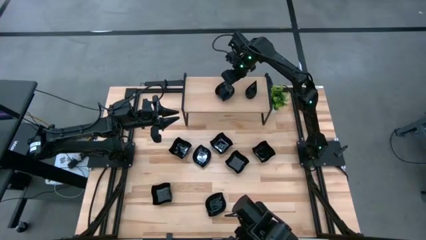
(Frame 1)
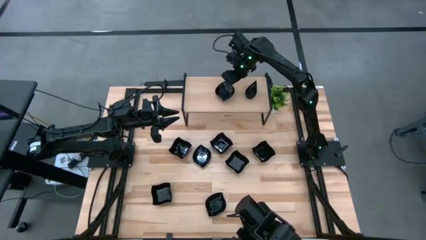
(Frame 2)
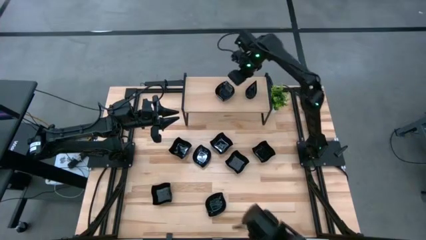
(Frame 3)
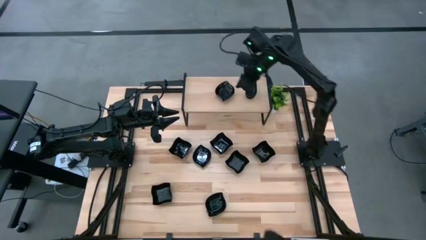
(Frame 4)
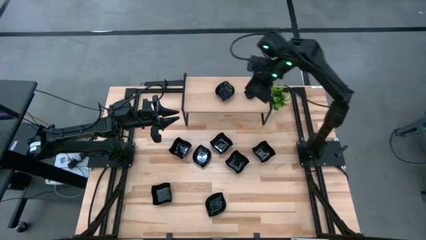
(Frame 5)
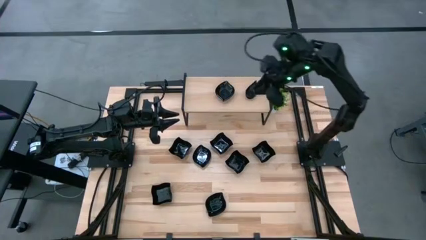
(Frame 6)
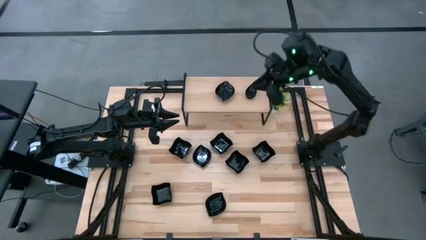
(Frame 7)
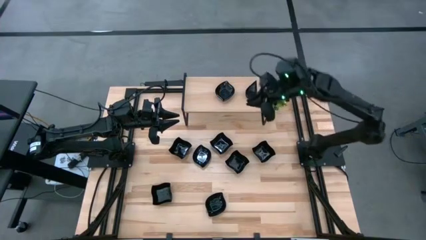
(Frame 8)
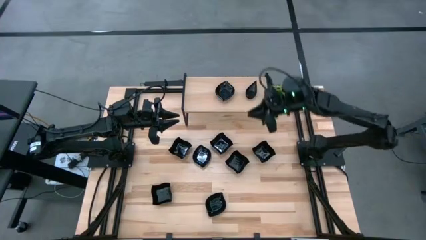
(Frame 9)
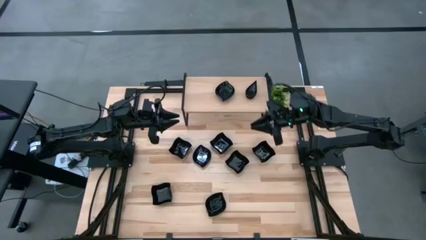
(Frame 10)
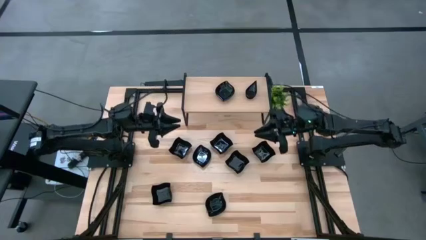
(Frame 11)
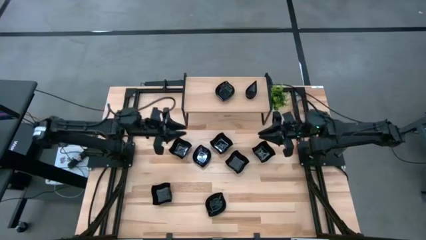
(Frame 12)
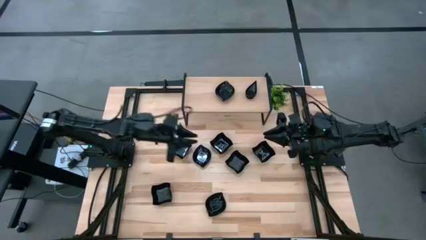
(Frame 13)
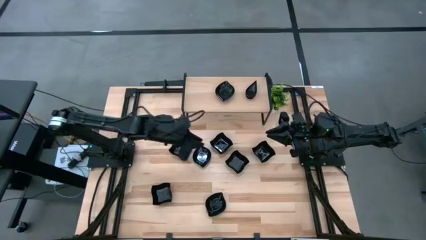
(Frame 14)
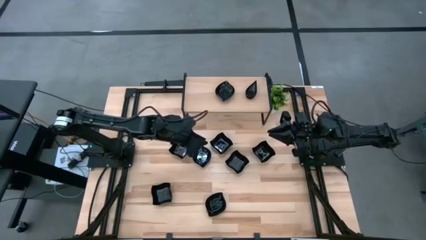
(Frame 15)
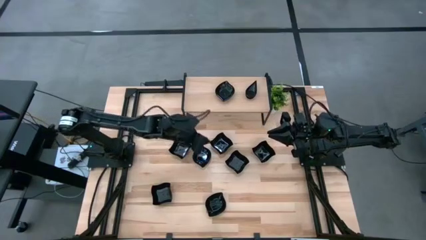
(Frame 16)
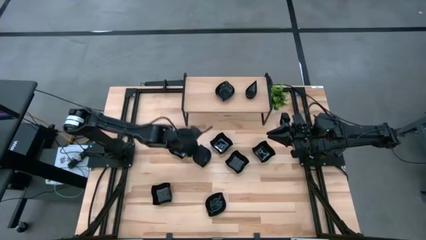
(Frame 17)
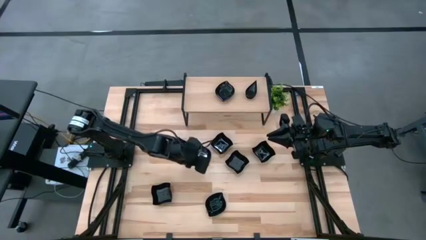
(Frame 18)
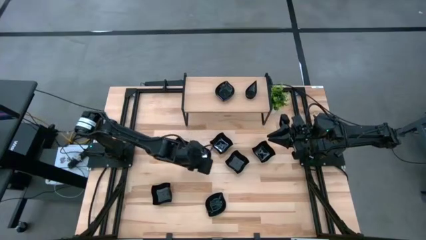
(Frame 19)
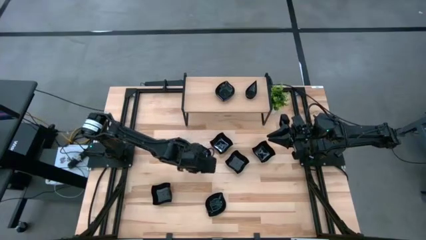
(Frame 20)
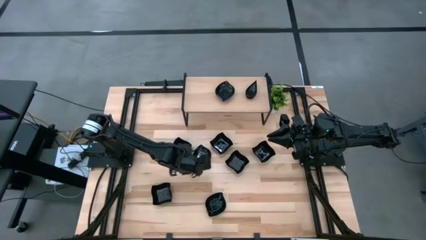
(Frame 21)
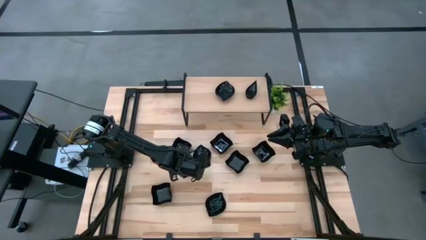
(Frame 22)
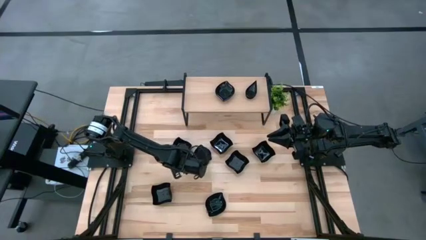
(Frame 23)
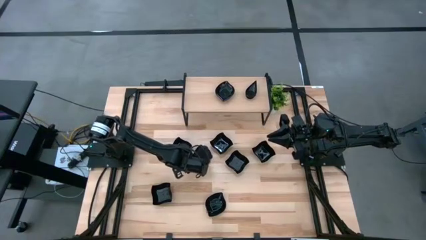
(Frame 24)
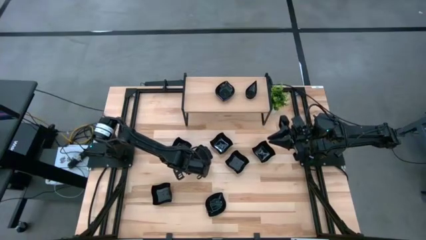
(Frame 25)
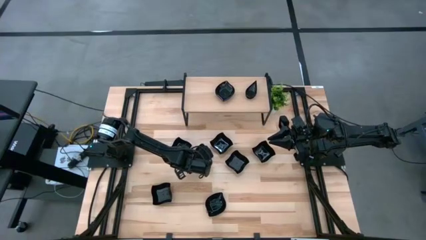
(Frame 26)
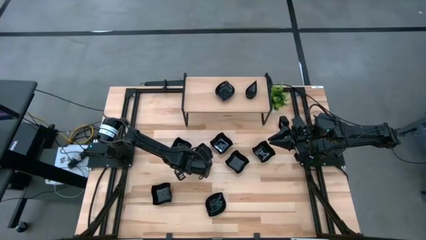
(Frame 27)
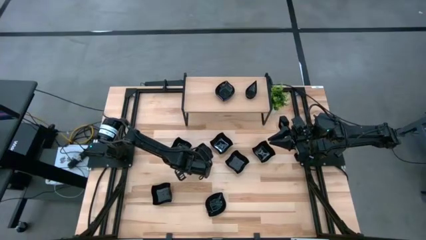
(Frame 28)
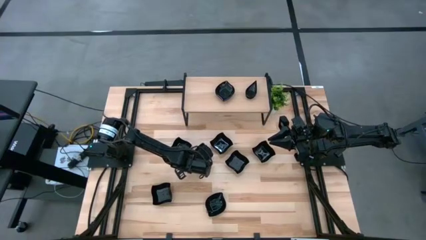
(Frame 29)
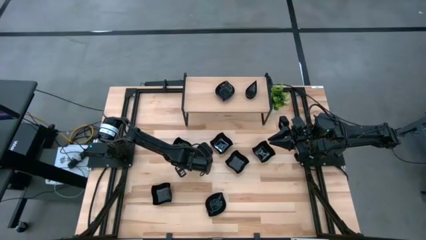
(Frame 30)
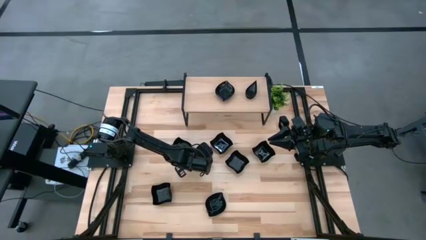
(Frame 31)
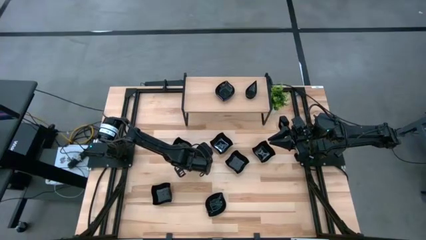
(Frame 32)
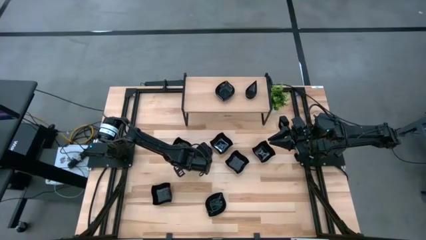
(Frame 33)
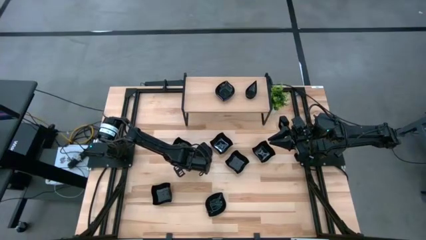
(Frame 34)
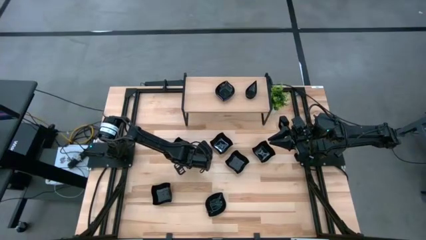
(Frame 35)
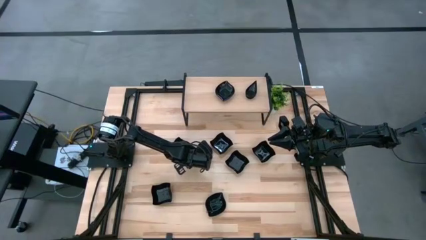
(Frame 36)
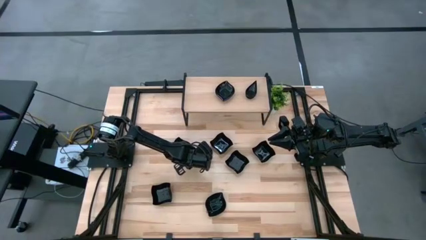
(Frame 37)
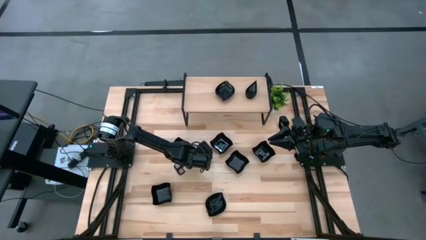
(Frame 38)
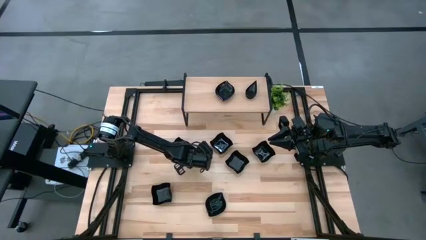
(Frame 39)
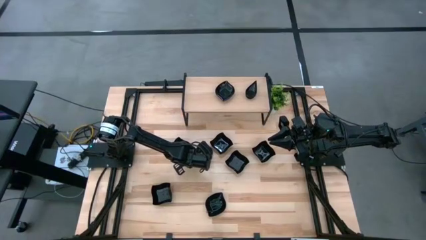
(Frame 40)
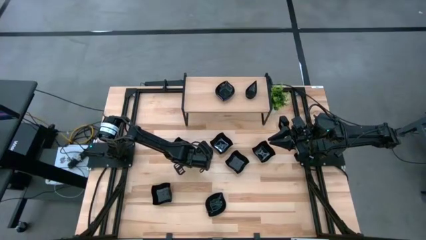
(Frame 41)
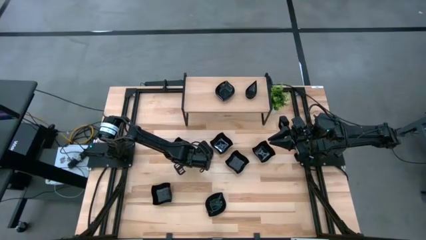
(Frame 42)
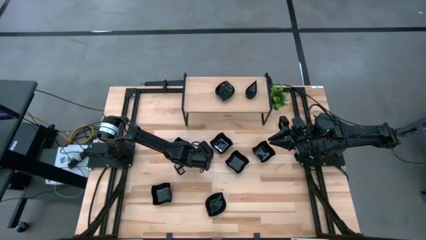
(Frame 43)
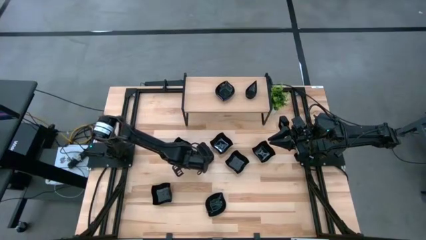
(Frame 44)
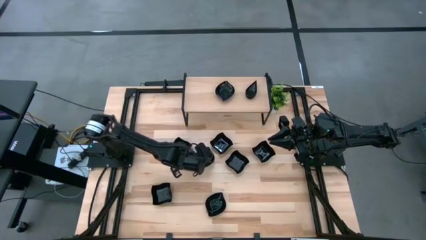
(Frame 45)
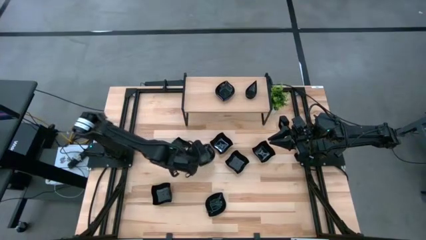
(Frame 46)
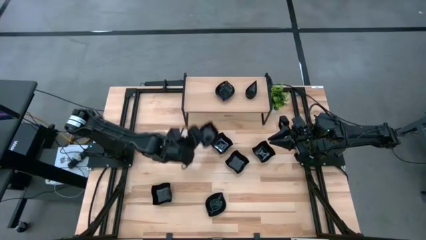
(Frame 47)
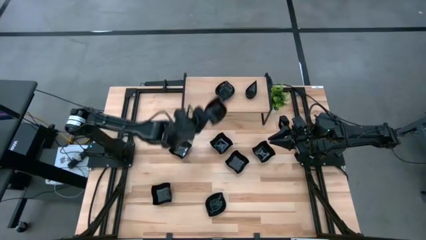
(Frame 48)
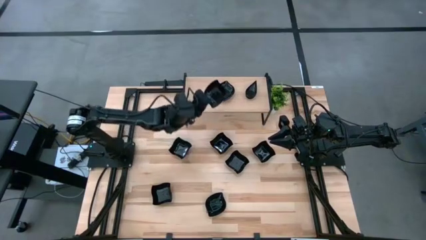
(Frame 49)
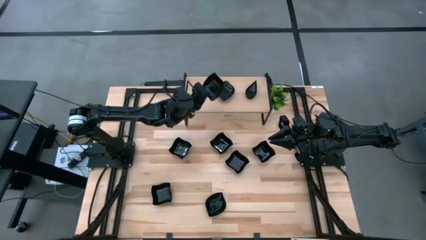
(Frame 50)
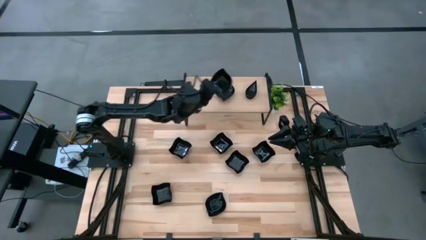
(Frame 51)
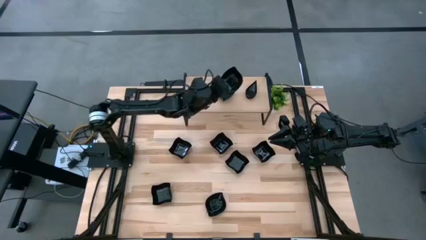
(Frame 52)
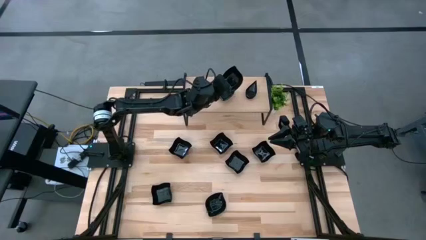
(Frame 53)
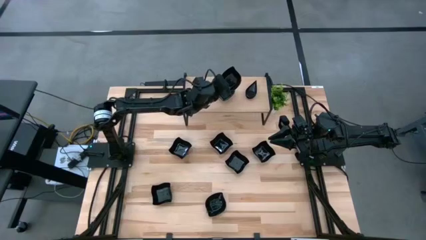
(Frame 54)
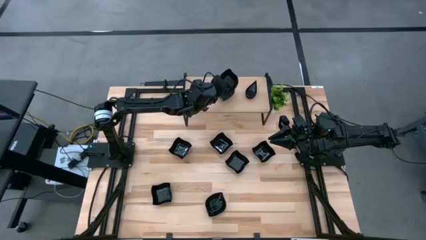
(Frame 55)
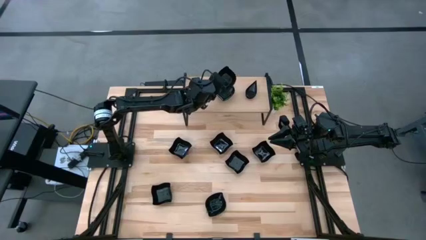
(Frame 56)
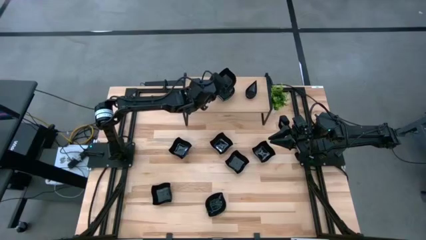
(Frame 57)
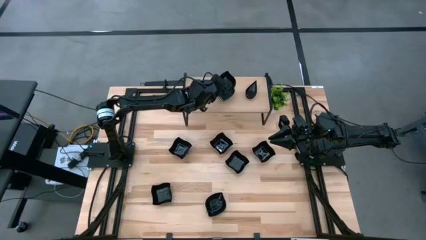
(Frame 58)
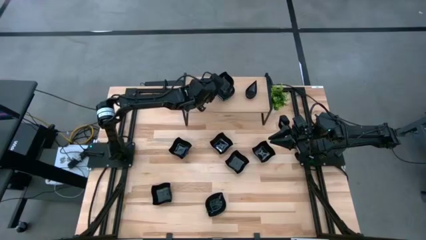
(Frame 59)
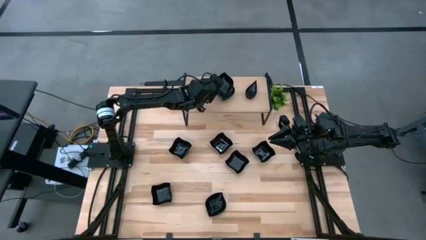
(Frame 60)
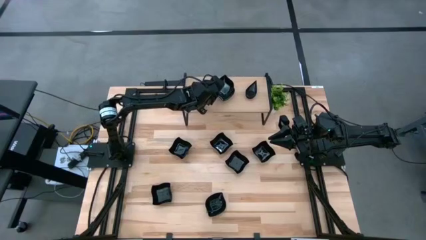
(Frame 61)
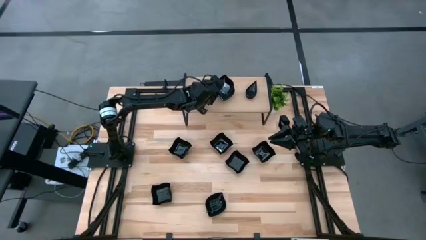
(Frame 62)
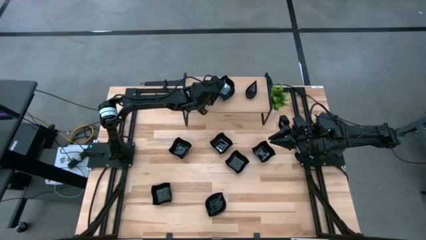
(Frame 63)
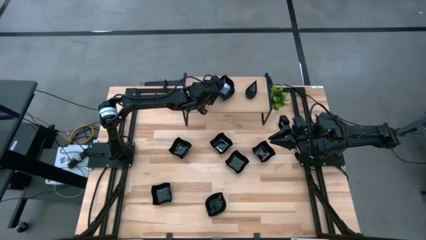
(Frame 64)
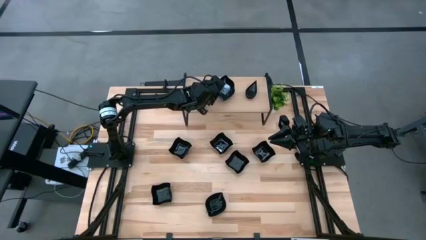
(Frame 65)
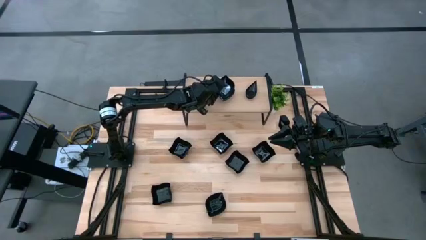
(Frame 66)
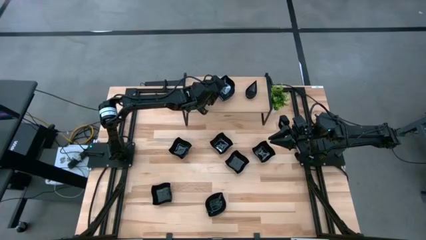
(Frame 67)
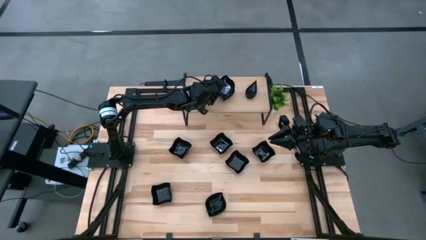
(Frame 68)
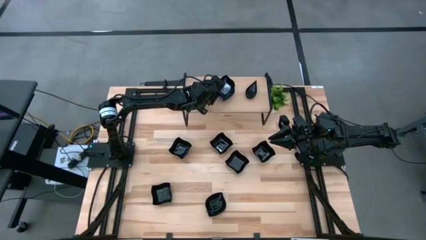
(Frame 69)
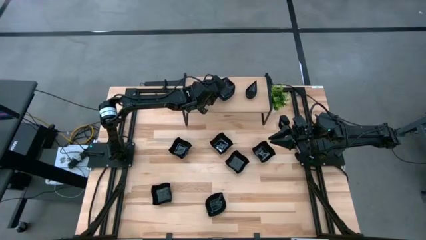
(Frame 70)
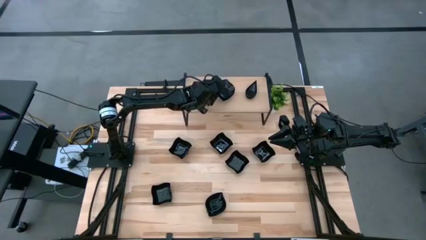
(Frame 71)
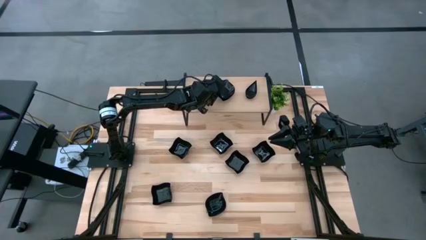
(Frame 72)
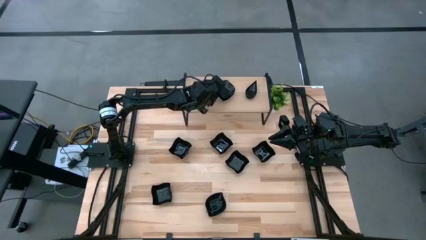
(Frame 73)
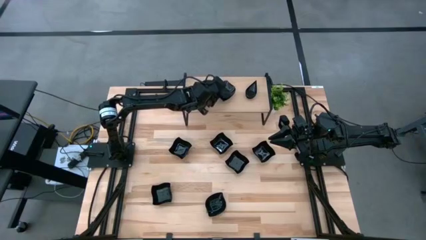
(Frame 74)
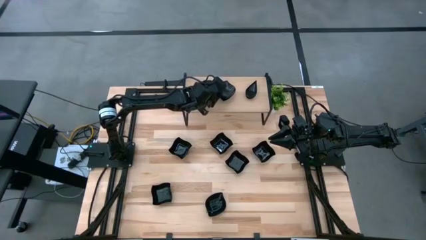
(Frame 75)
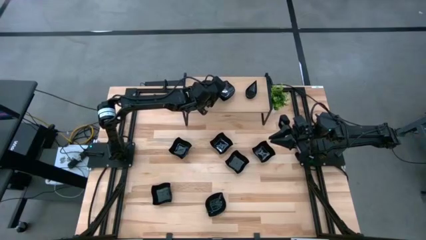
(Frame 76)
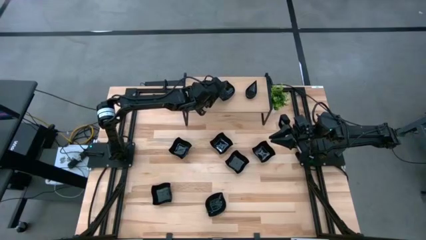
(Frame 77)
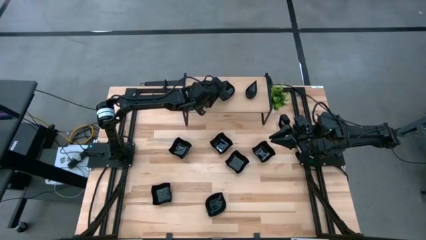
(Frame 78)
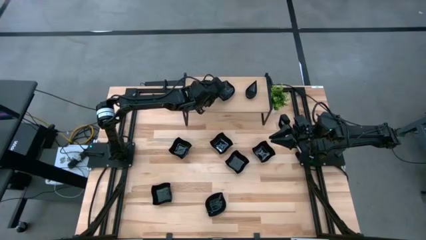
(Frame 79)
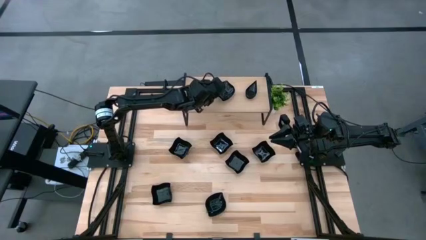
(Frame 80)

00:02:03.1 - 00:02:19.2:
Task: Pick & Place Mini shaped plates
Stack the top black leaf shaped plate on top of the other black leaf shaped plates on the shelf
